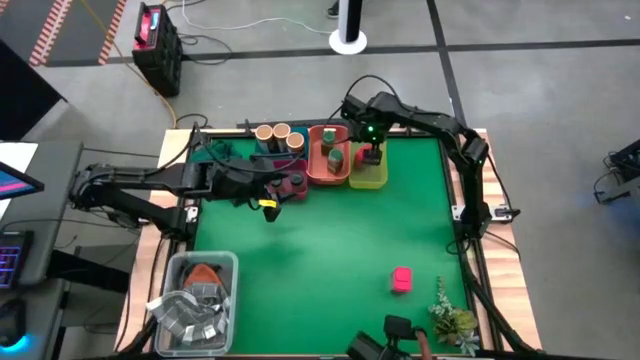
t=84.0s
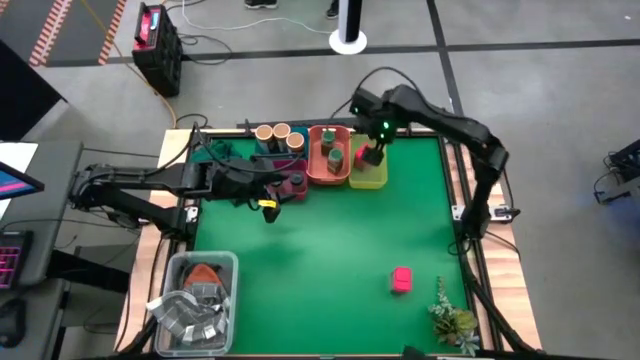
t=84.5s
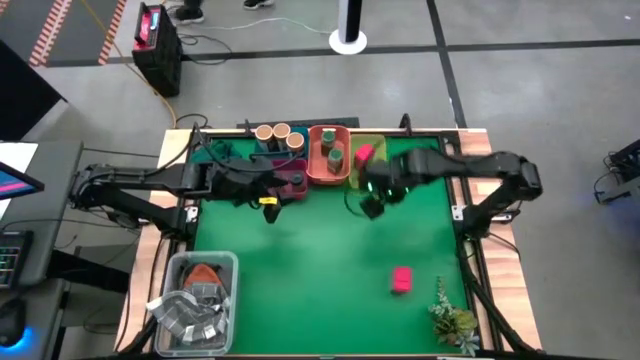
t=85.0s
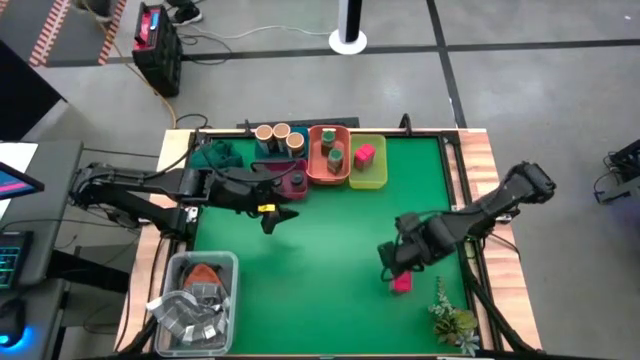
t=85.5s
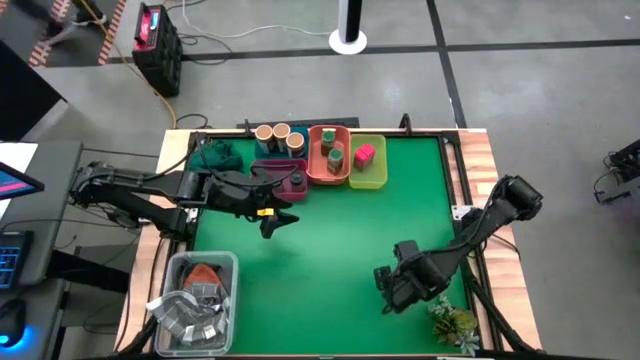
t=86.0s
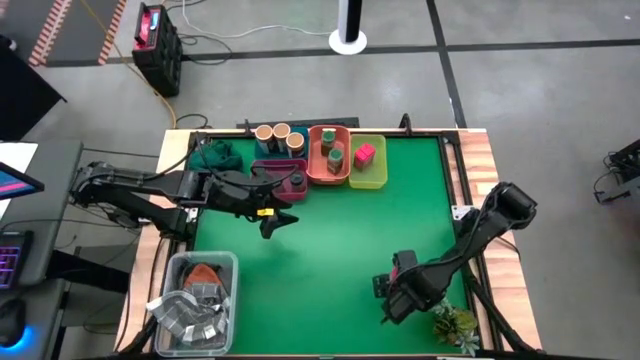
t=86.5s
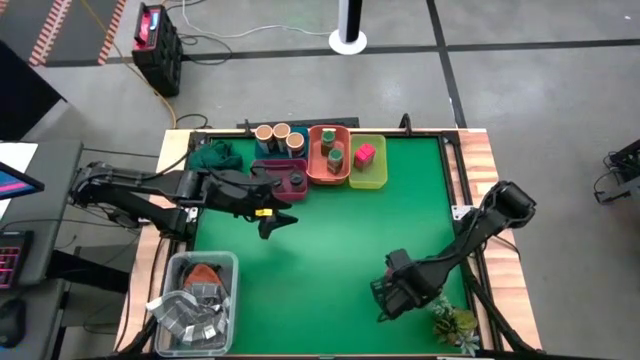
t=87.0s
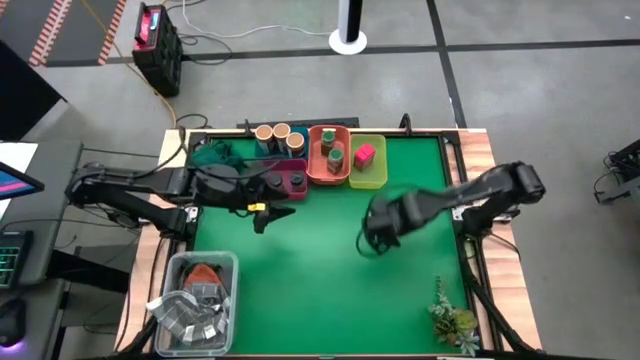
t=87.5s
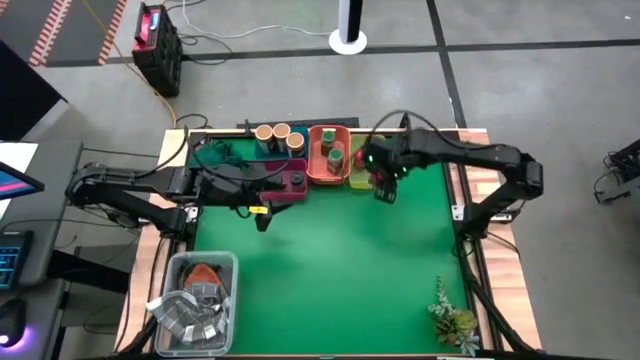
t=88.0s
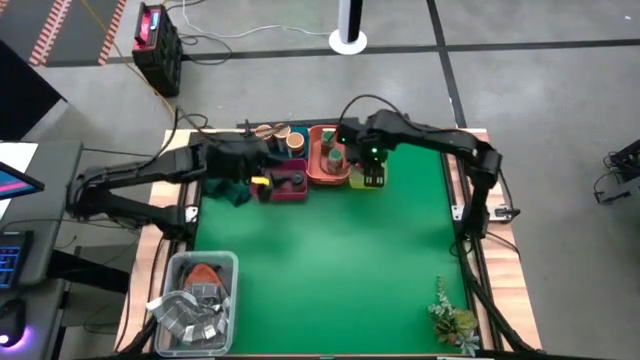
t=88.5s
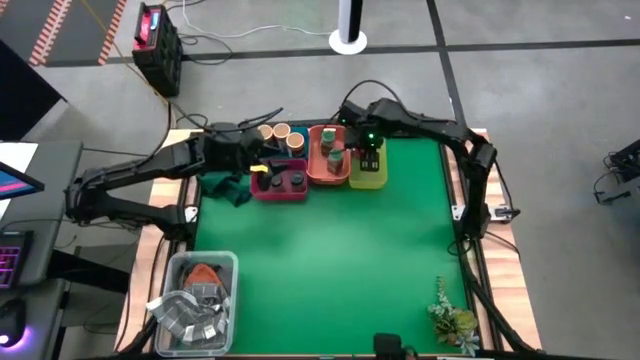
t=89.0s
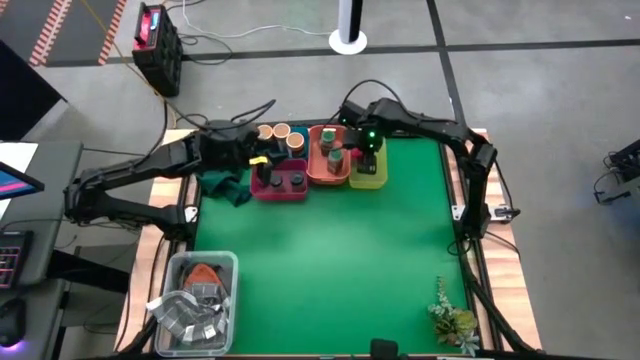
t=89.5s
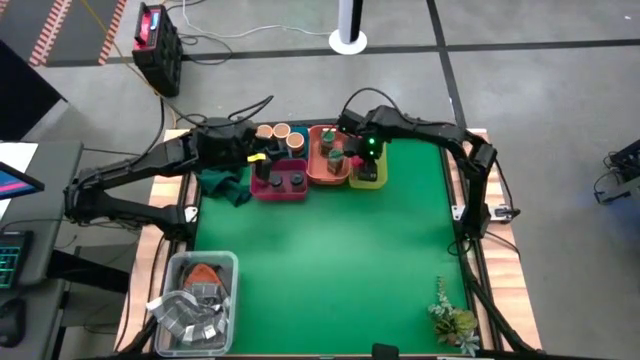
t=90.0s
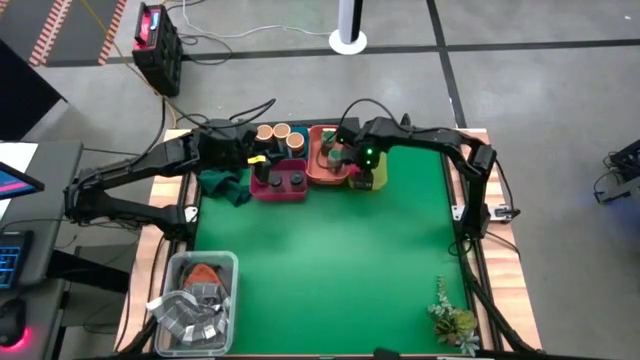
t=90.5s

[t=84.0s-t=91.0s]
Task: Sort spices by type
Put the red seasoning can into the yellow bin

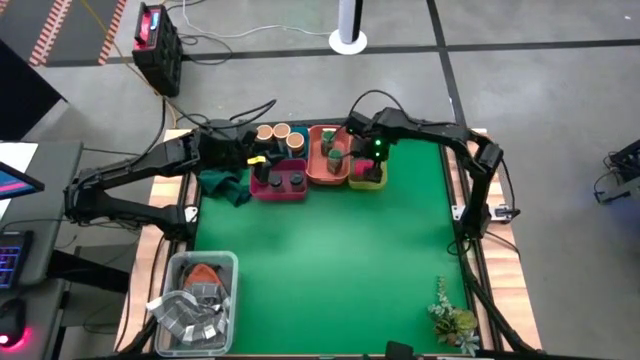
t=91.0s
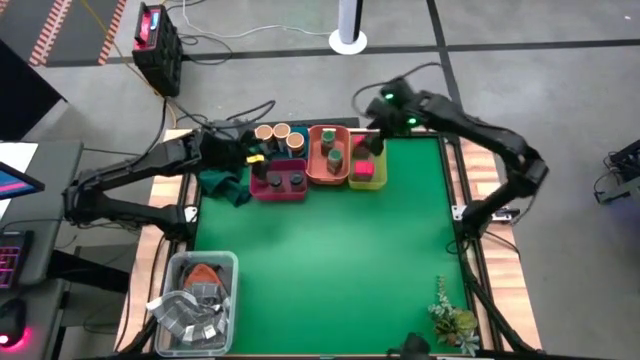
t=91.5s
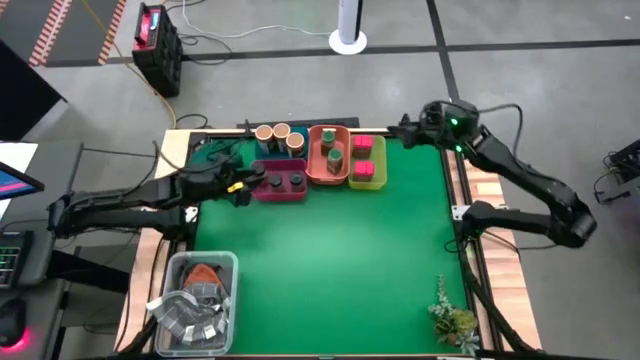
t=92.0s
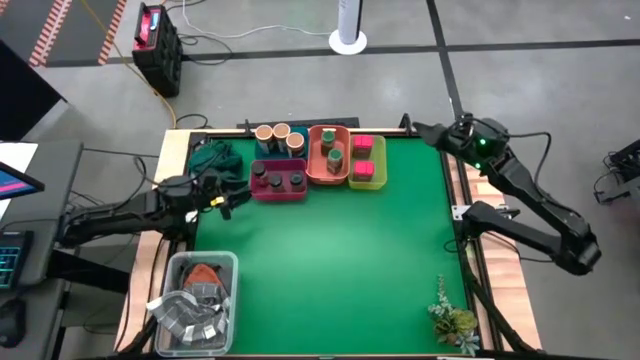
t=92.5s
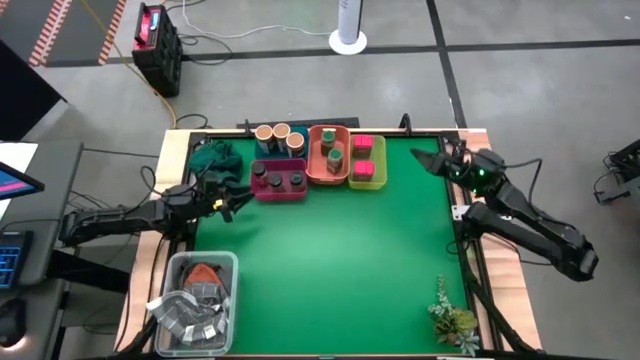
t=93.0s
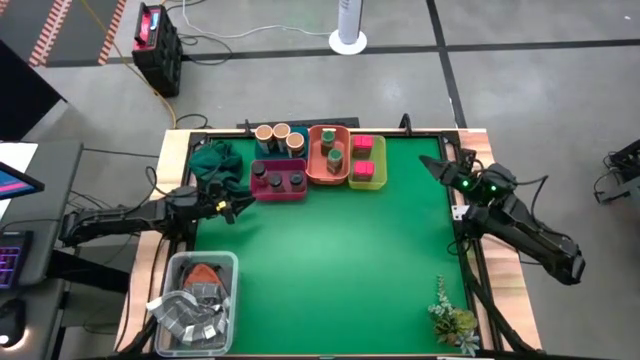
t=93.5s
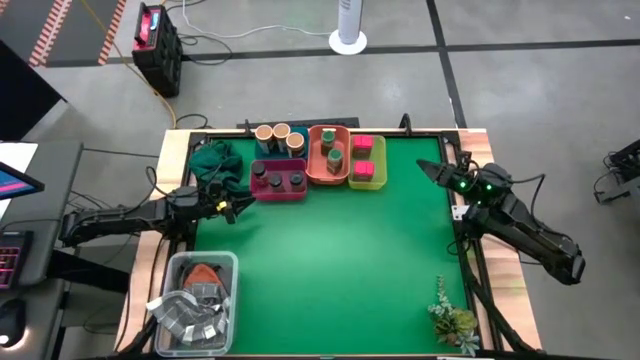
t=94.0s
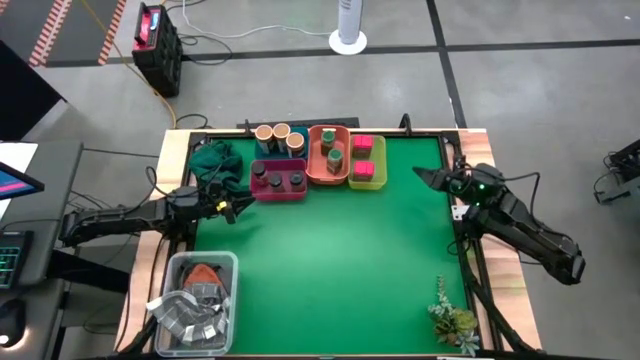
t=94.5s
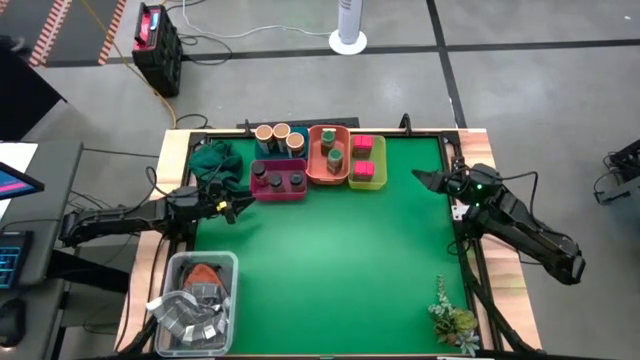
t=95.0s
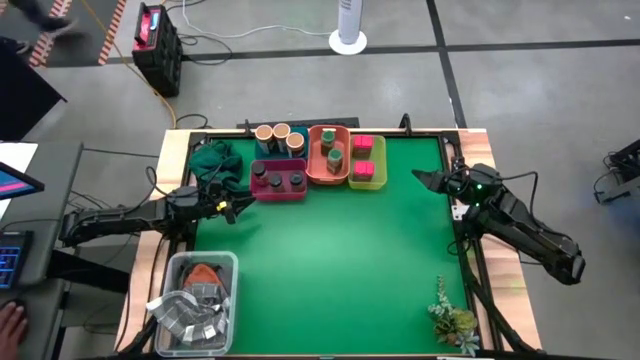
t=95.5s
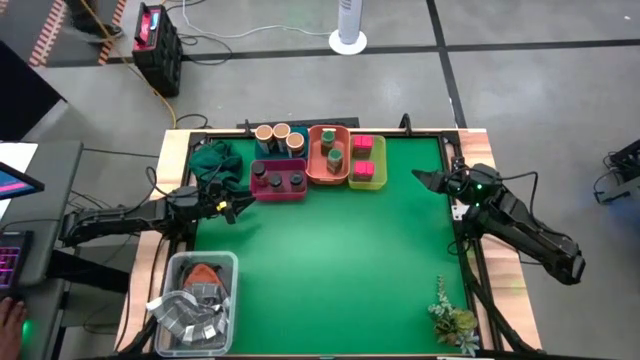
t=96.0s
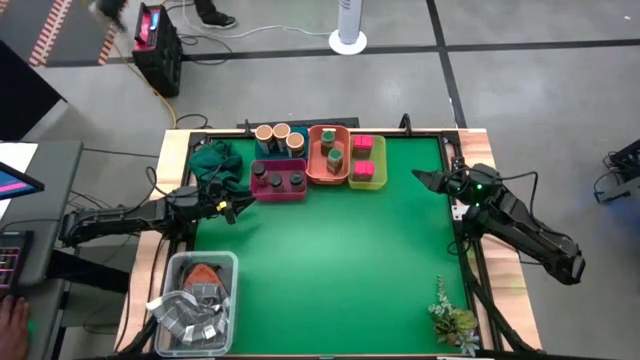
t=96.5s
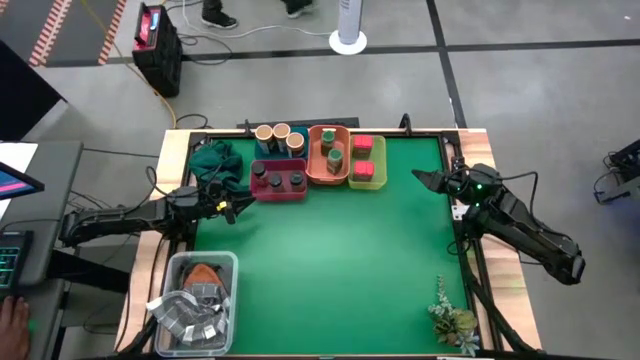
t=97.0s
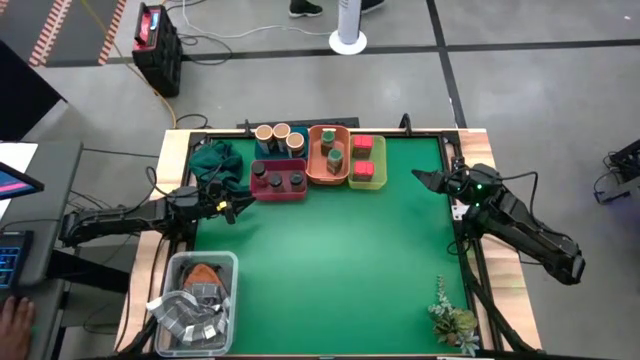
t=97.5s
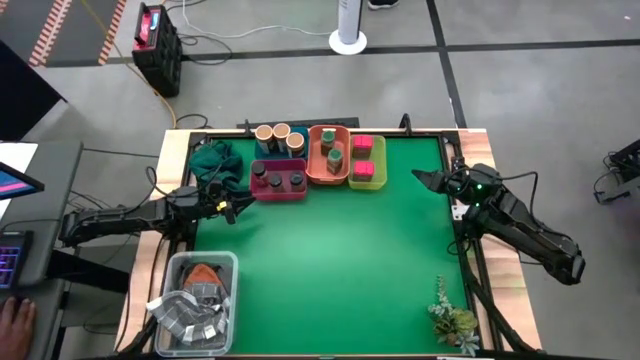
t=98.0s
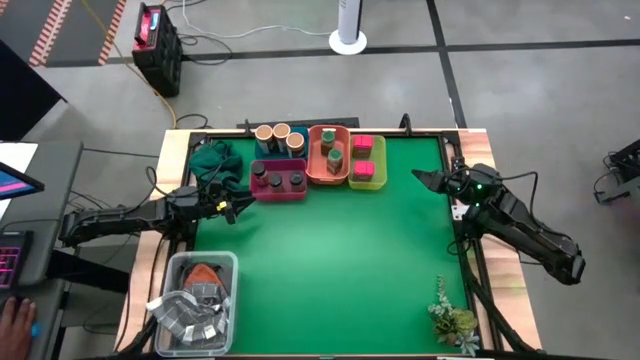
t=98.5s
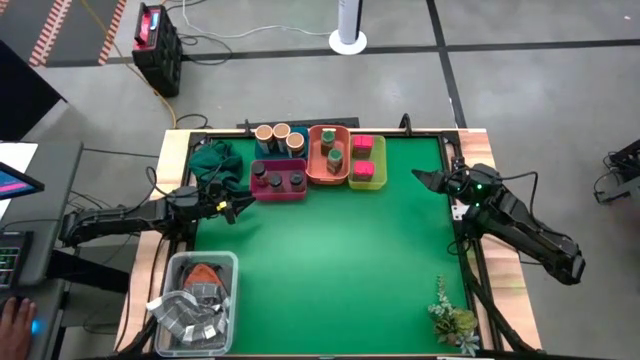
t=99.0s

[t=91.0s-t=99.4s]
Return to Home Position

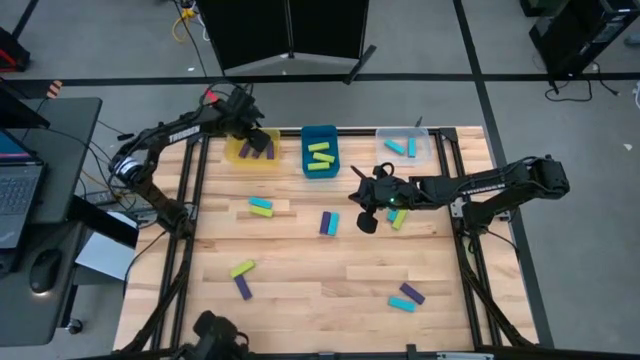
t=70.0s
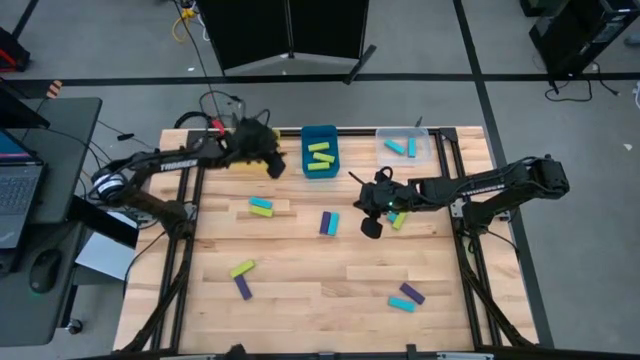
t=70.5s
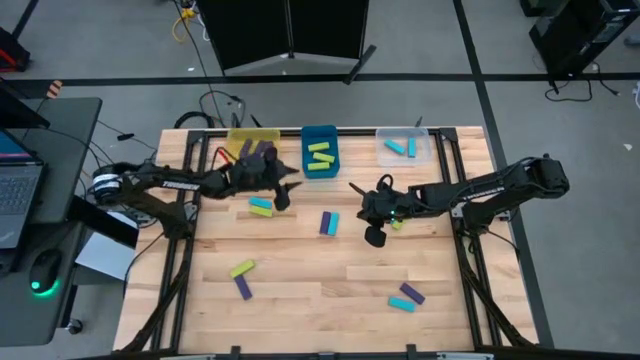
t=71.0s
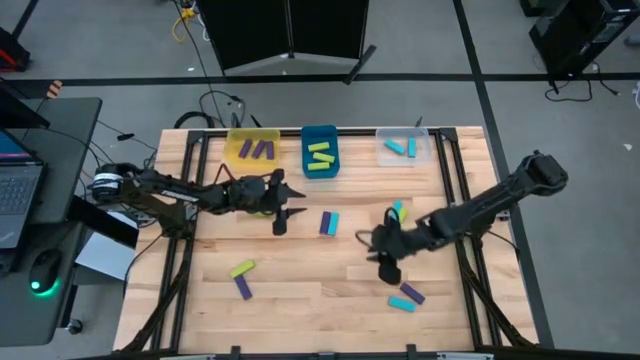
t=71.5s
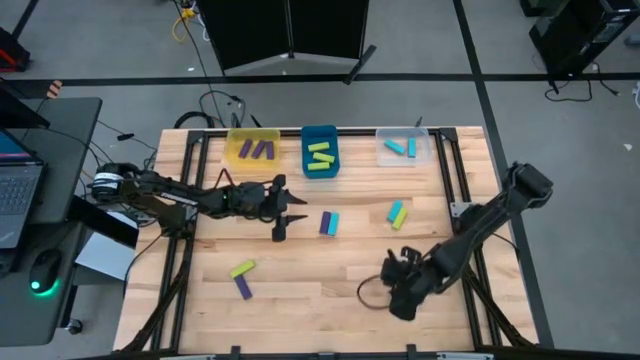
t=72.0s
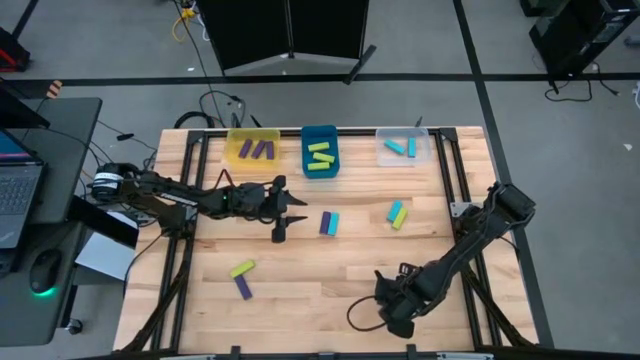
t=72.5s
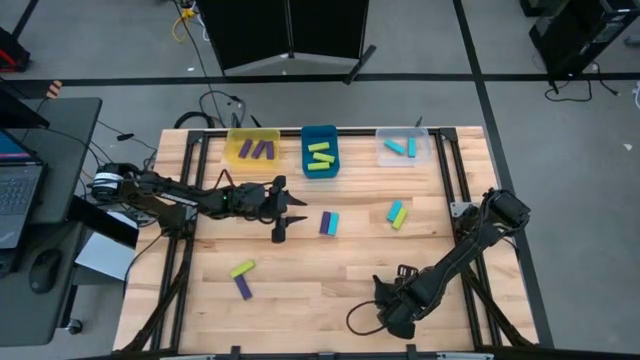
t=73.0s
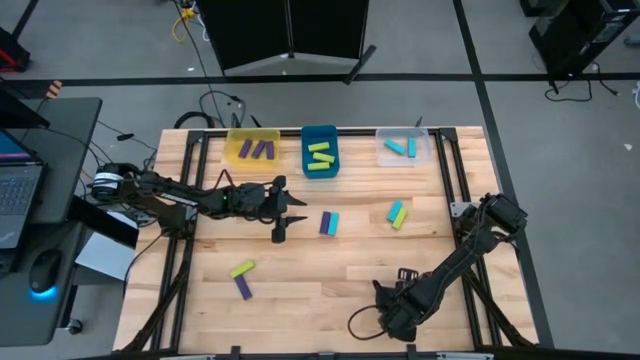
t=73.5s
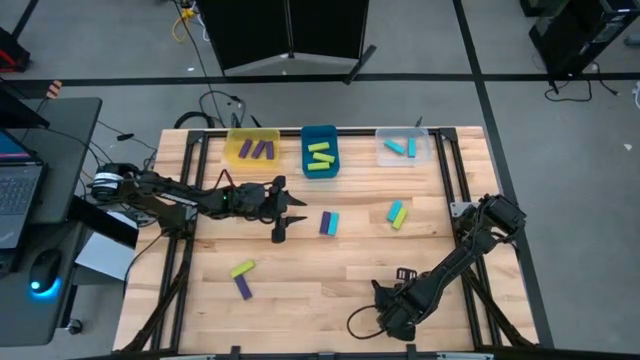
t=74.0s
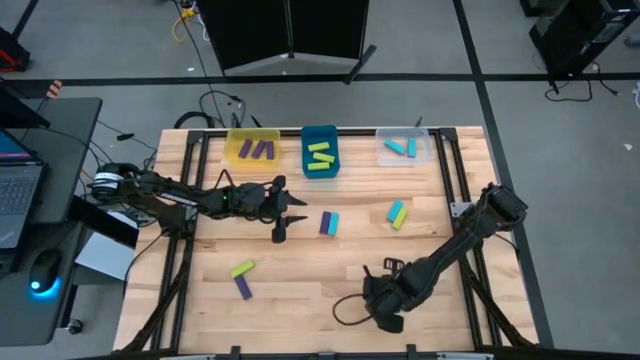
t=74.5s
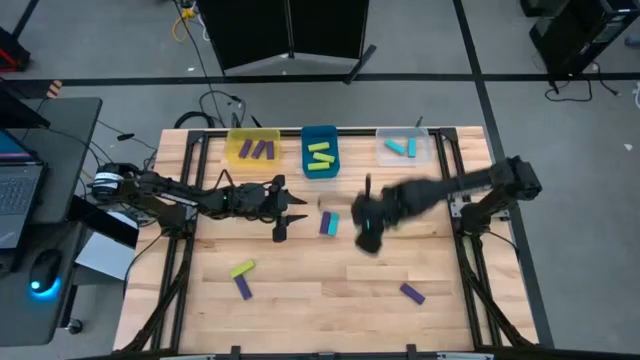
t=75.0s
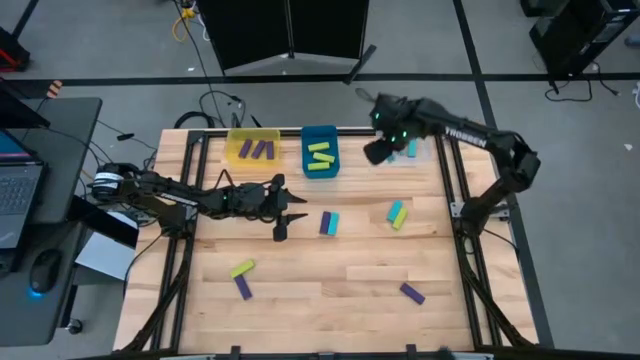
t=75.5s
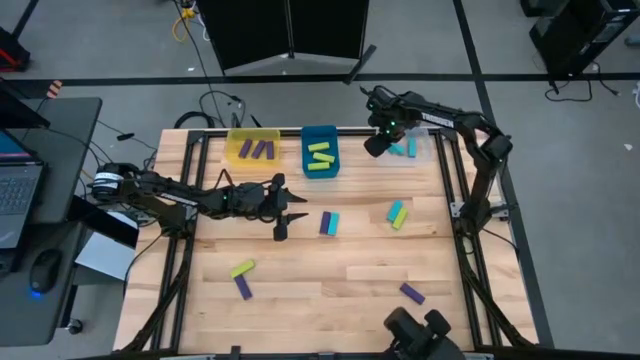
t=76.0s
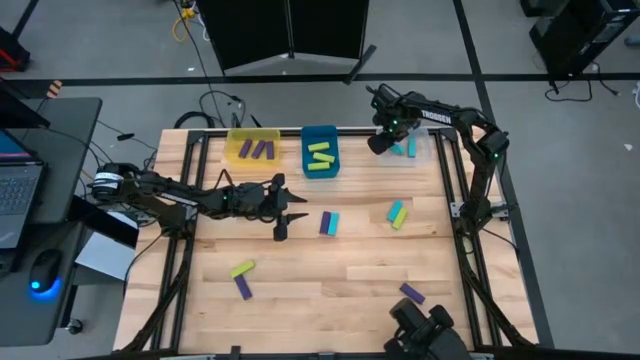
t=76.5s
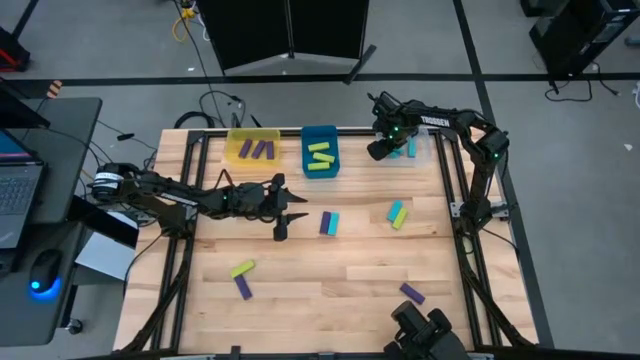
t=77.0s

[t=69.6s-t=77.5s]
Task: Sort blocks
Put the blue block into the transparent bin
